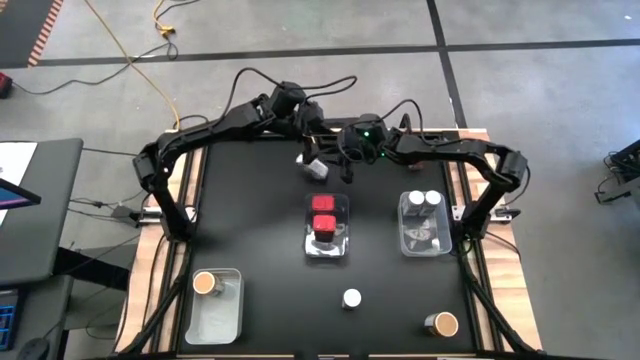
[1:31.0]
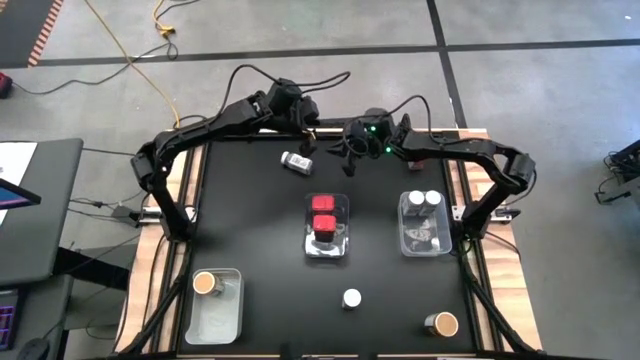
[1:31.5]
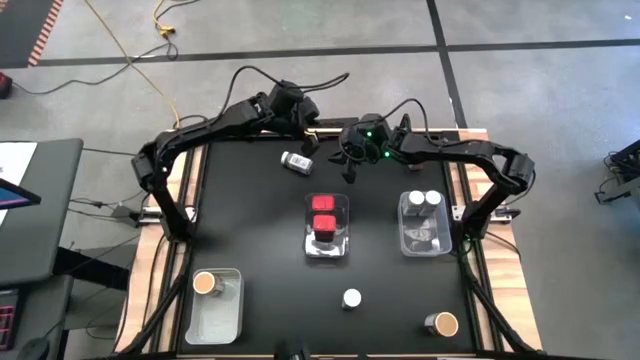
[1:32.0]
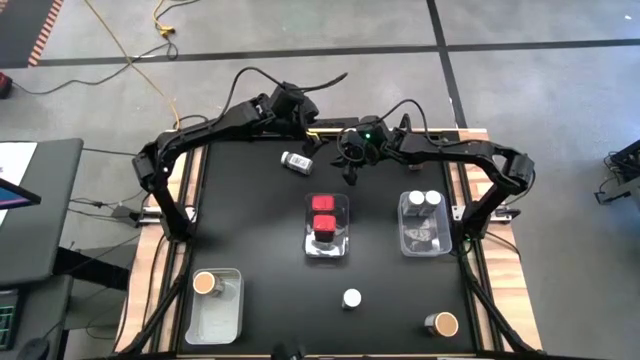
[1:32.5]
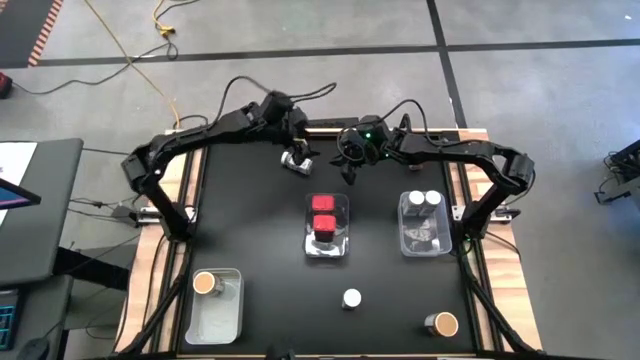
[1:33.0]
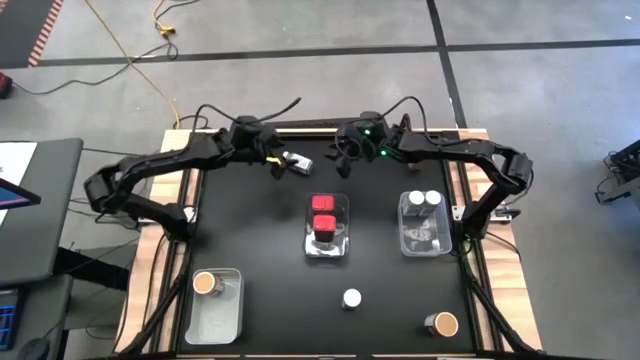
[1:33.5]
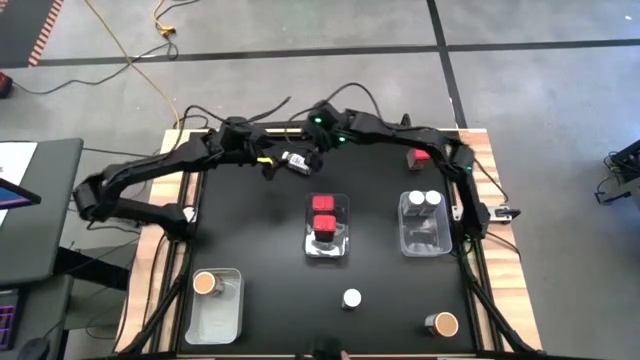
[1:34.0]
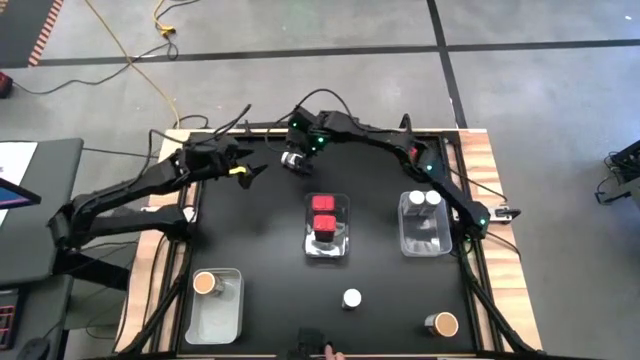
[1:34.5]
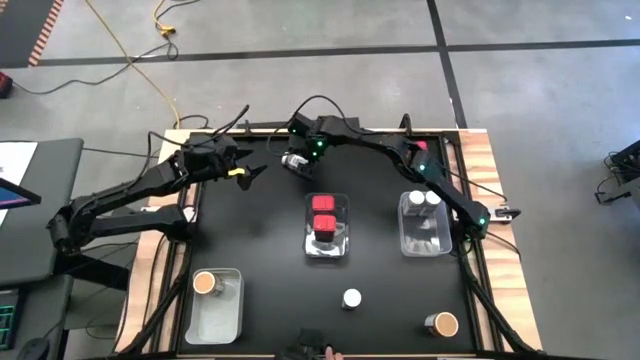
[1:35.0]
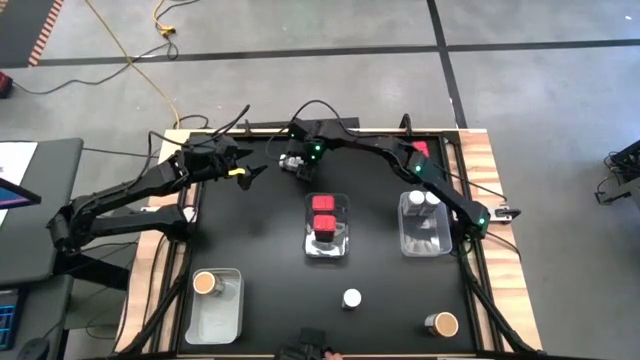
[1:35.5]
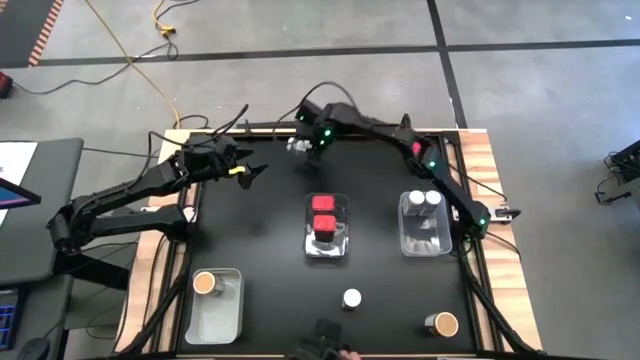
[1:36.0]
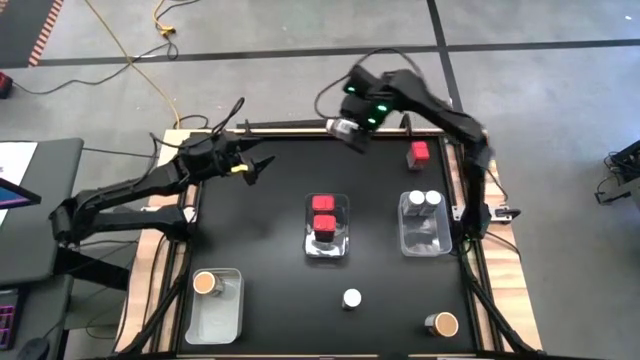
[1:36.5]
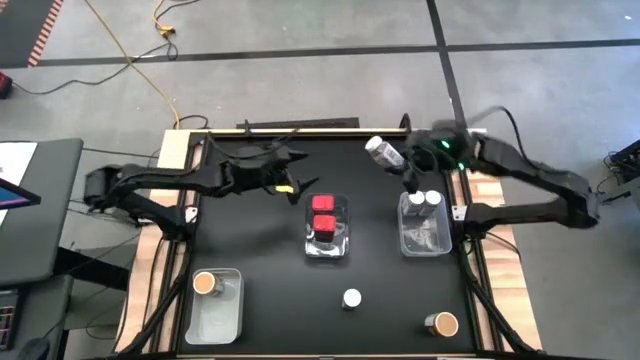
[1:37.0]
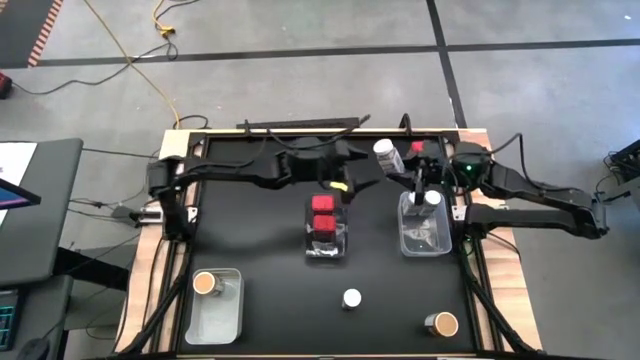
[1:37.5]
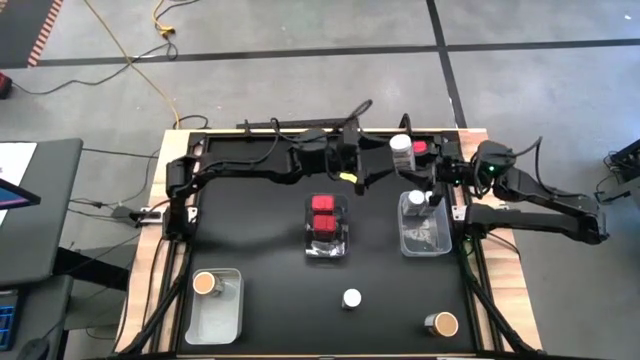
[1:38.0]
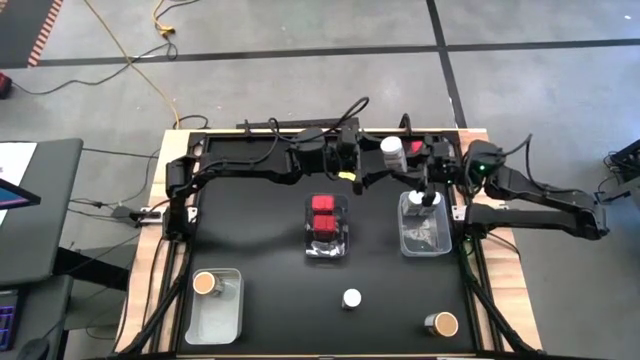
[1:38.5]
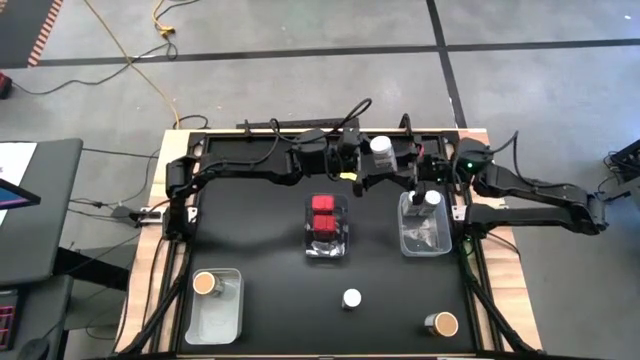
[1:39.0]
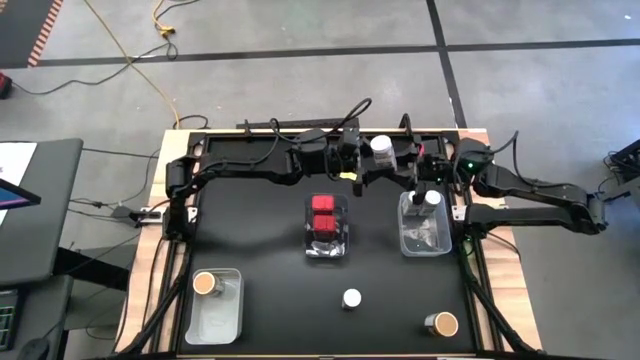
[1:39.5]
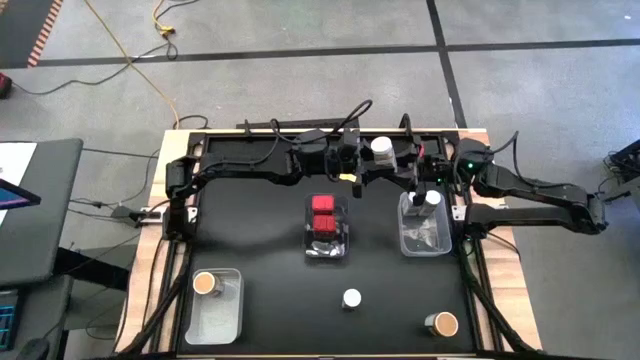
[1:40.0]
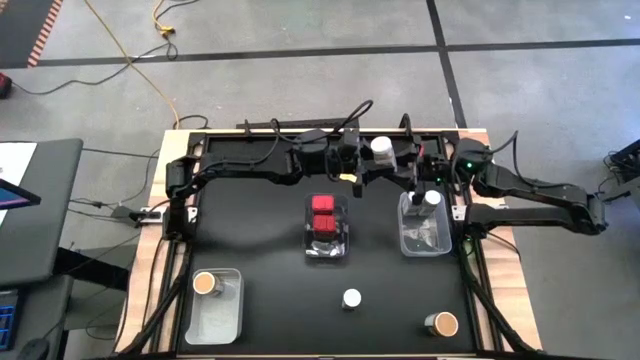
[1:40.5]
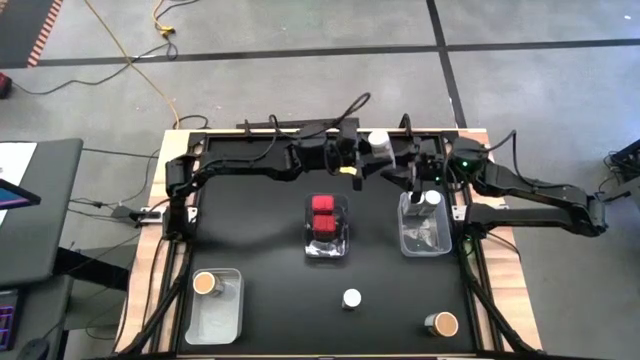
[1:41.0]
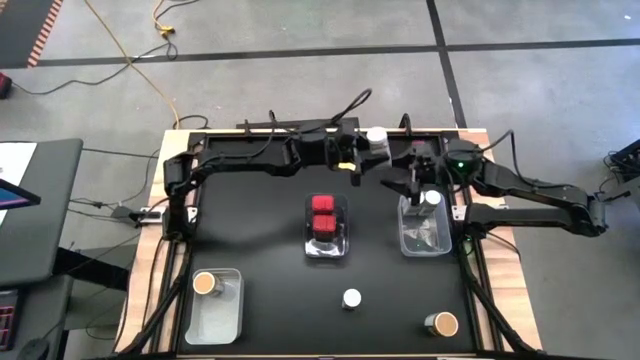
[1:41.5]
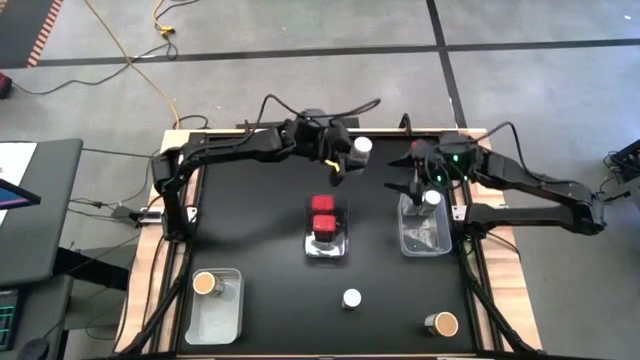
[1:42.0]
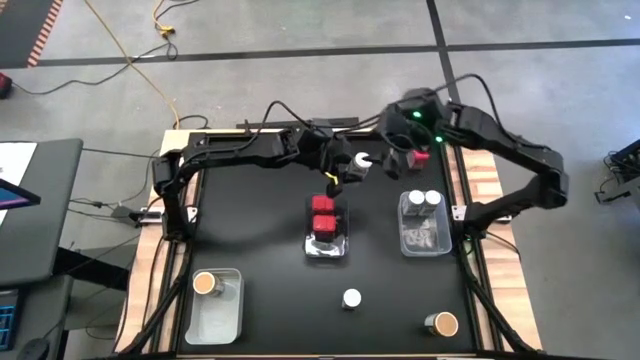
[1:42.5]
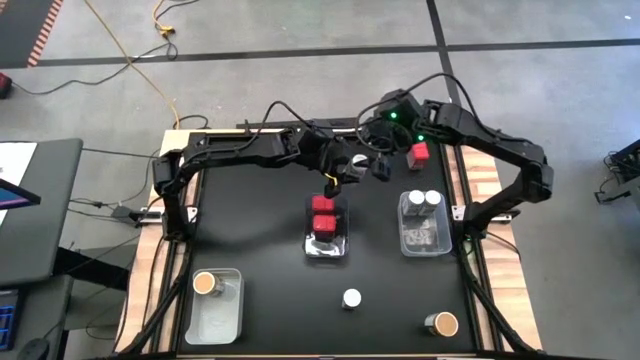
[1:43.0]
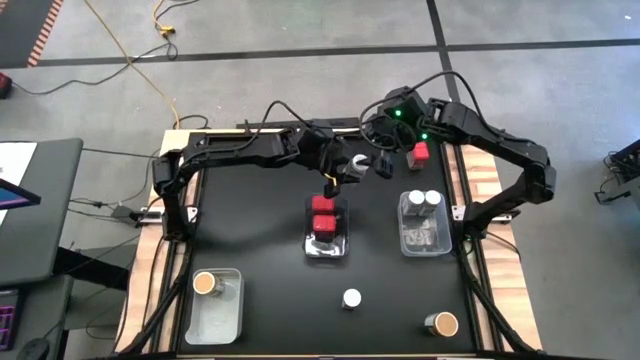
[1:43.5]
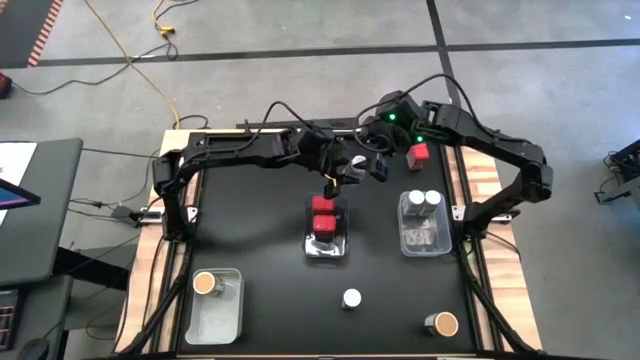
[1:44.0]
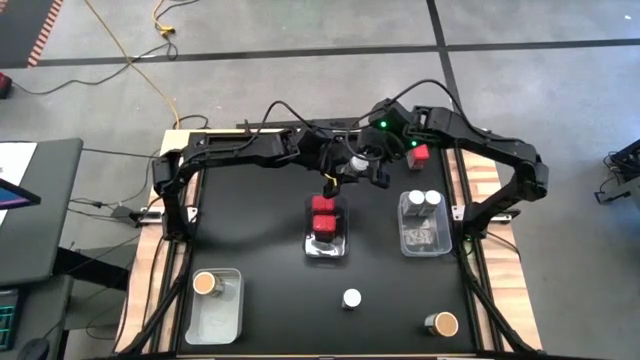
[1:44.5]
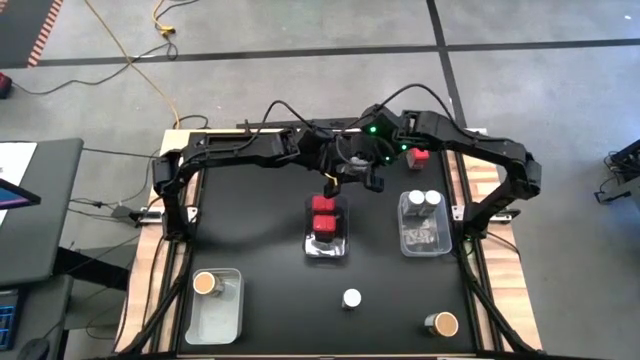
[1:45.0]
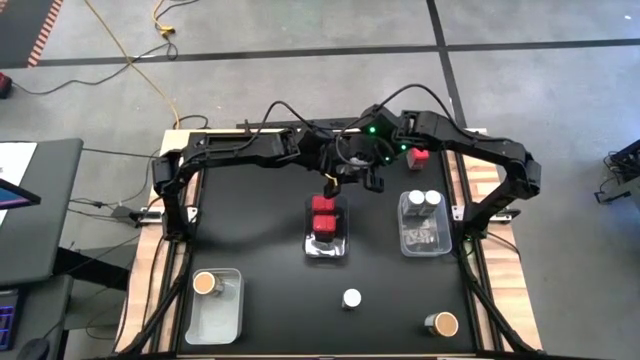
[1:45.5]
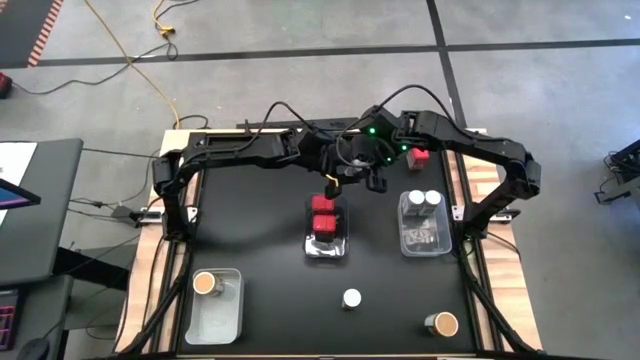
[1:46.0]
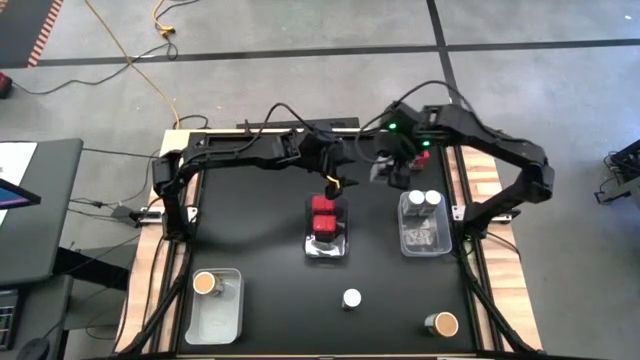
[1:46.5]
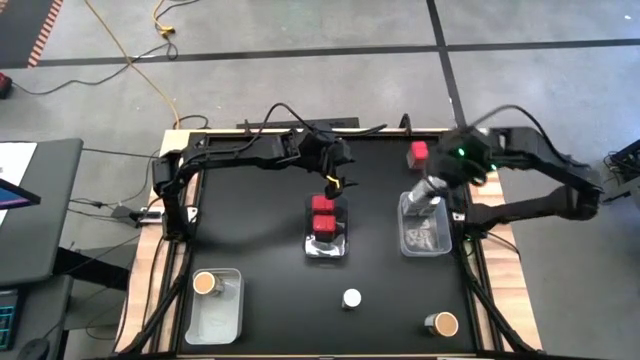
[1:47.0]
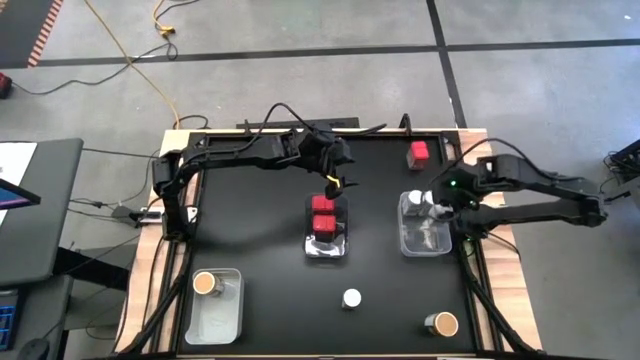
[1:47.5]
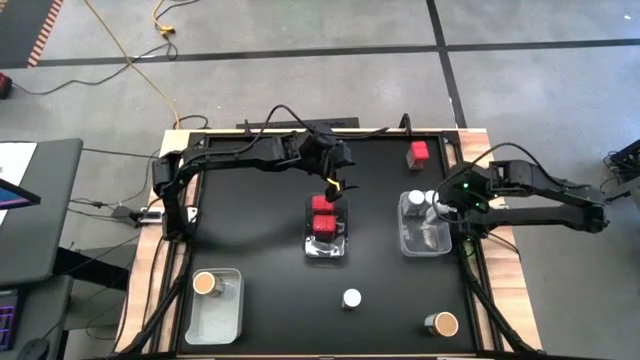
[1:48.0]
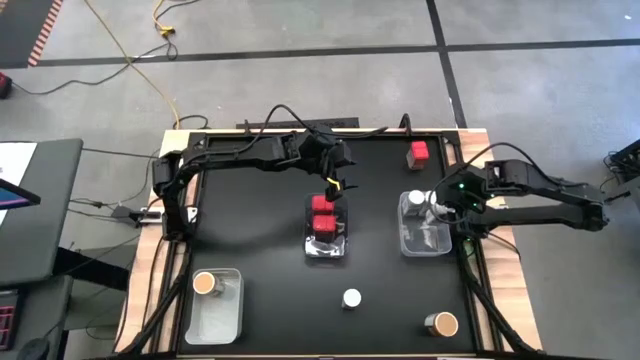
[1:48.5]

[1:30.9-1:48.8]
Task: Sort spices by type
Put the white seasoning bottle into the transparent bin

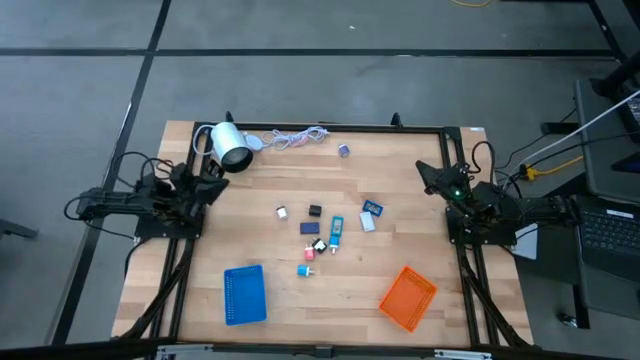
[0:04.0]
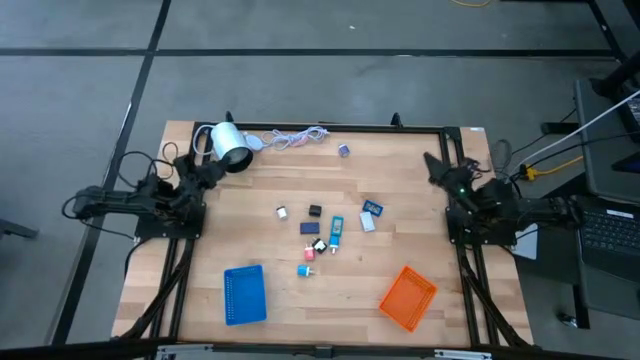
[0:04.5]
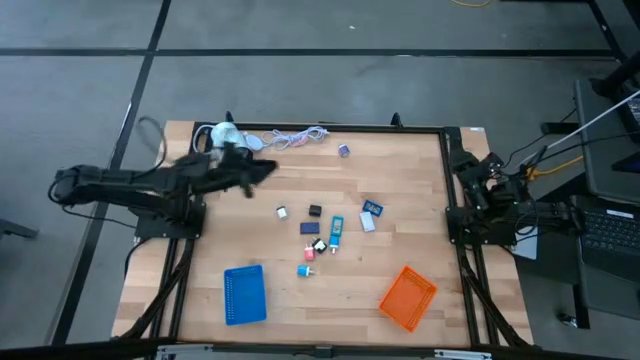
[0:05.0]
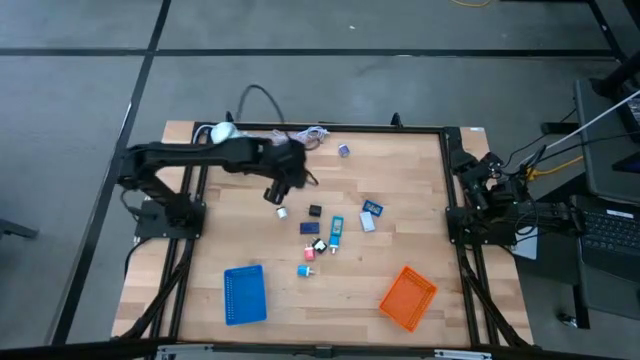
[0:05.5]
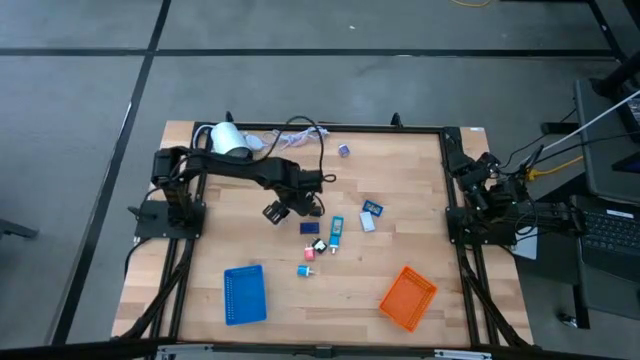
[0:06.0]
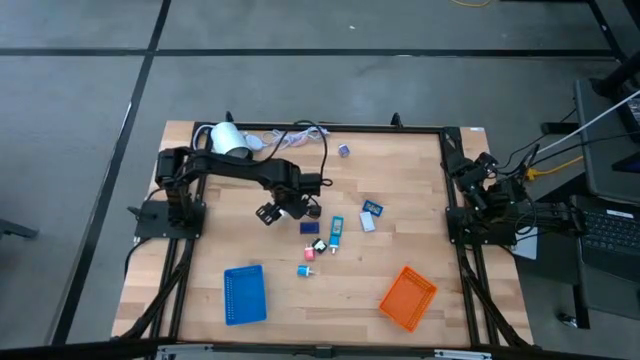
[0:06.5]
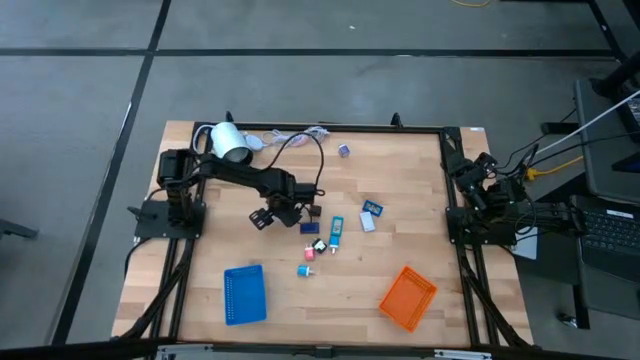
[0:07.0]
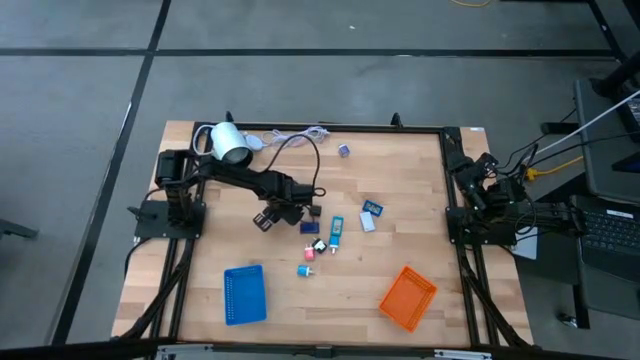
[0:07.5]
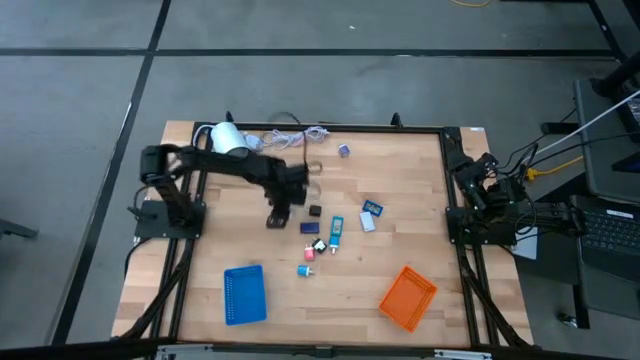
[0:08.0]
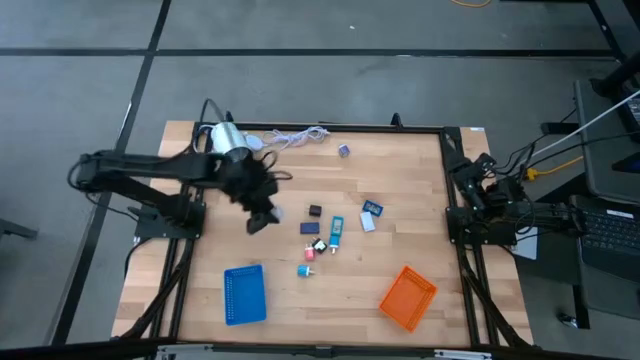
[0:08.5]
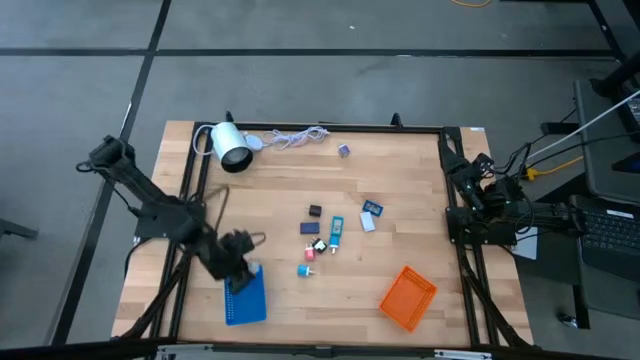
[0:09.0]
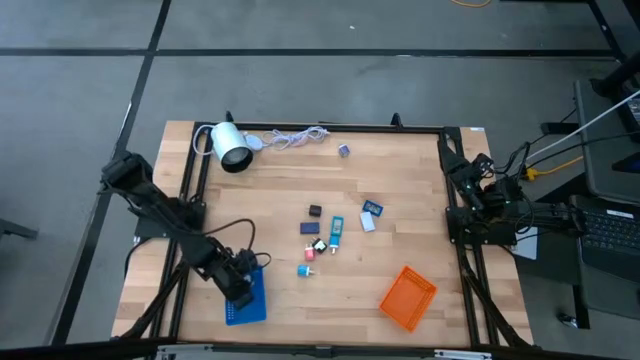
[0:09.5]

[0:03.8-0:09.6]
Task: Pick & Place Office items
Put the white charger adapter into the blue basket
